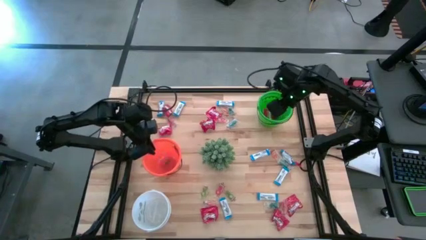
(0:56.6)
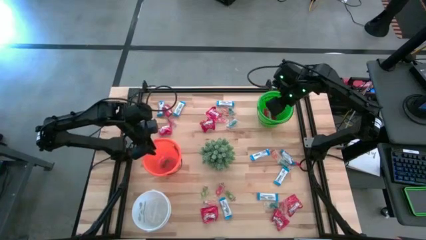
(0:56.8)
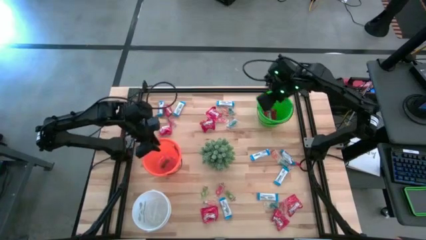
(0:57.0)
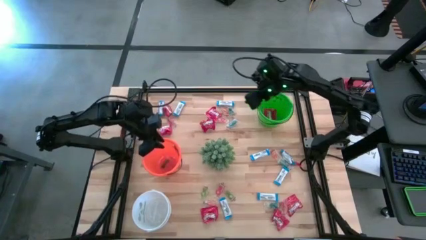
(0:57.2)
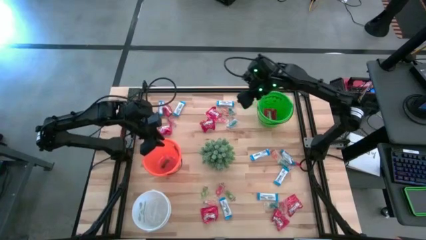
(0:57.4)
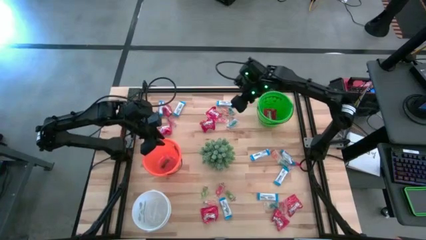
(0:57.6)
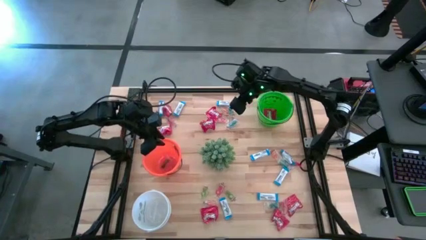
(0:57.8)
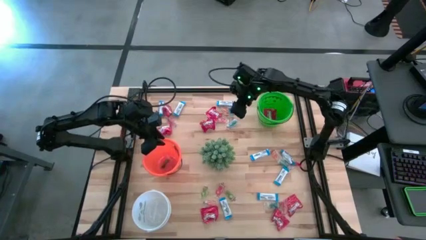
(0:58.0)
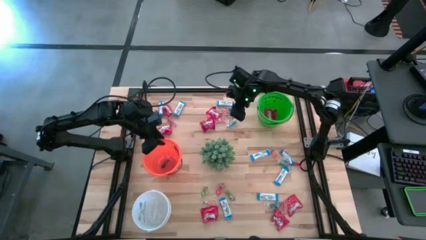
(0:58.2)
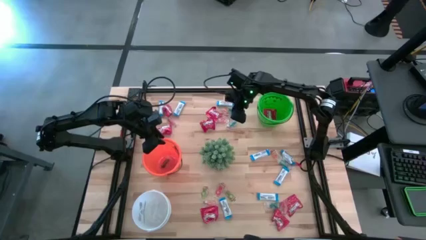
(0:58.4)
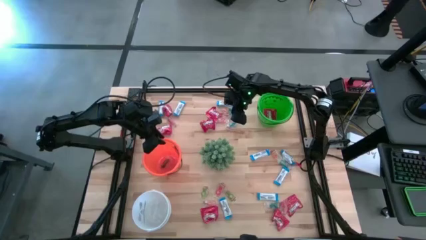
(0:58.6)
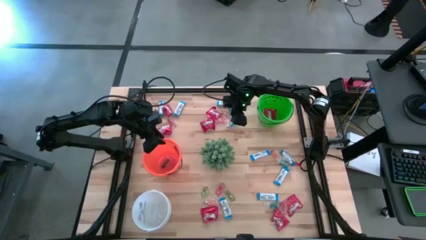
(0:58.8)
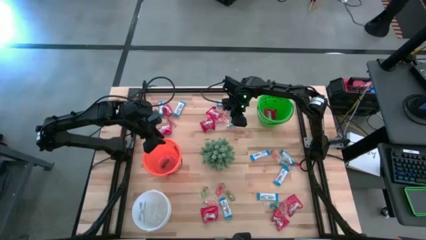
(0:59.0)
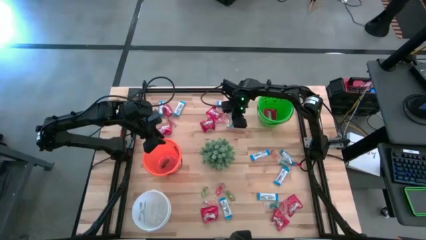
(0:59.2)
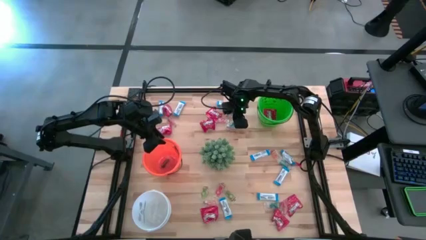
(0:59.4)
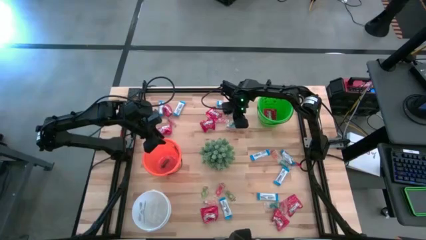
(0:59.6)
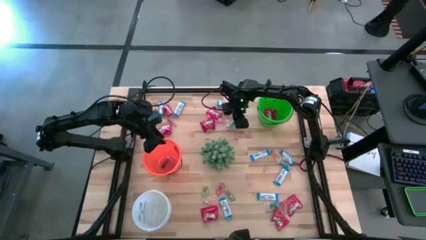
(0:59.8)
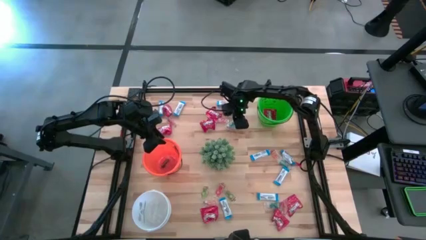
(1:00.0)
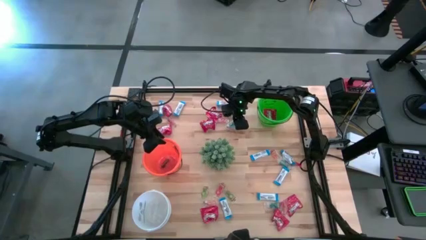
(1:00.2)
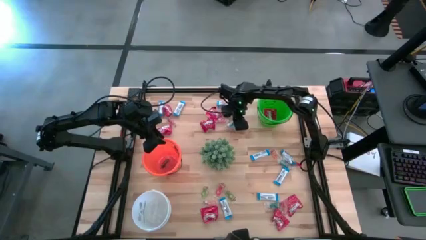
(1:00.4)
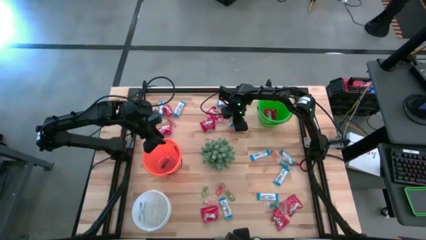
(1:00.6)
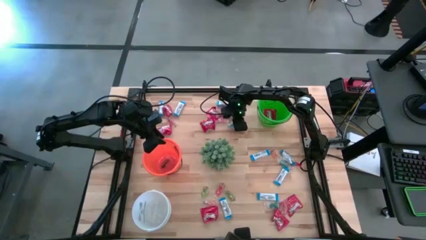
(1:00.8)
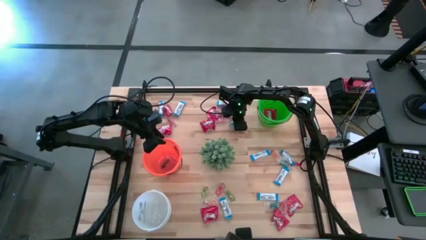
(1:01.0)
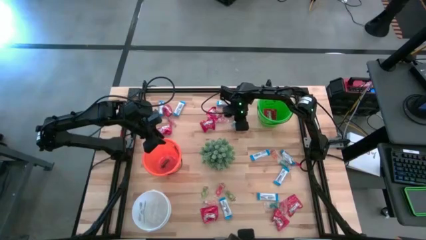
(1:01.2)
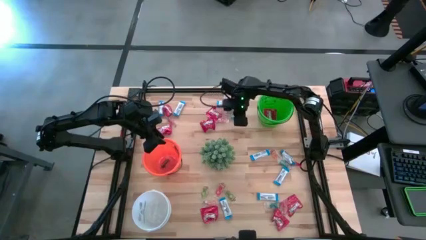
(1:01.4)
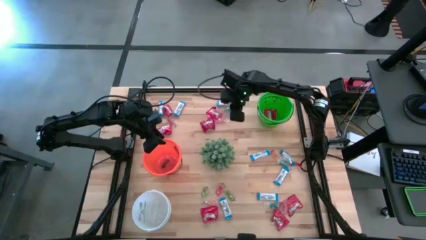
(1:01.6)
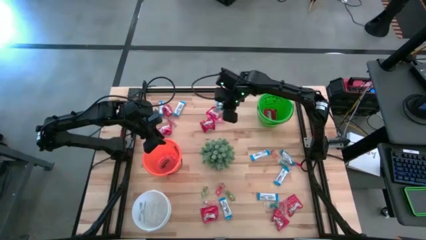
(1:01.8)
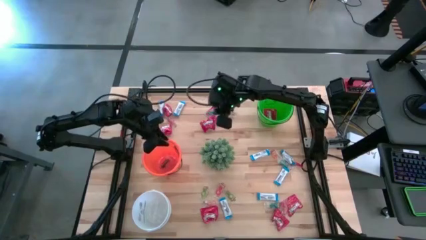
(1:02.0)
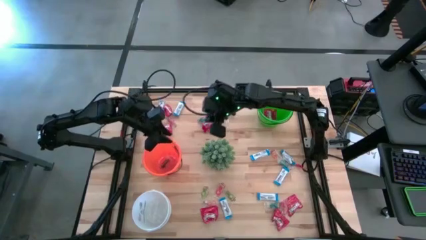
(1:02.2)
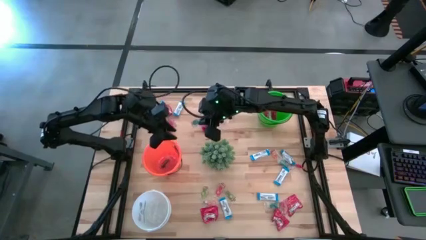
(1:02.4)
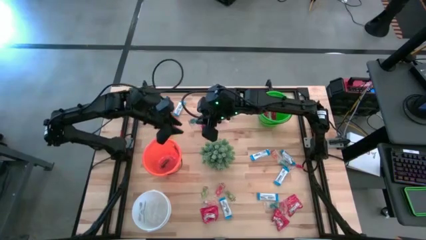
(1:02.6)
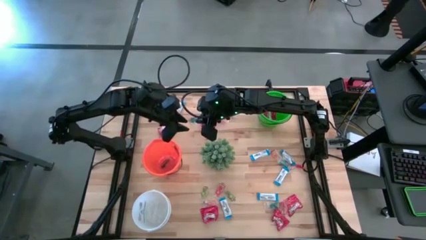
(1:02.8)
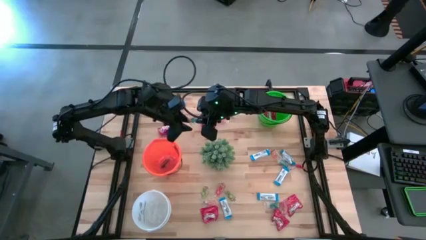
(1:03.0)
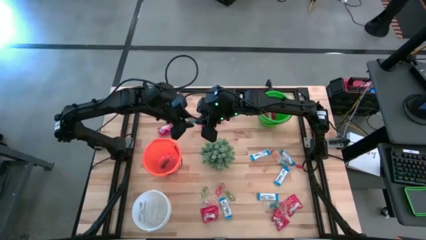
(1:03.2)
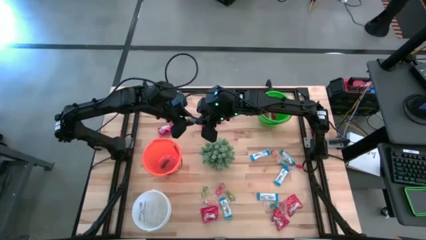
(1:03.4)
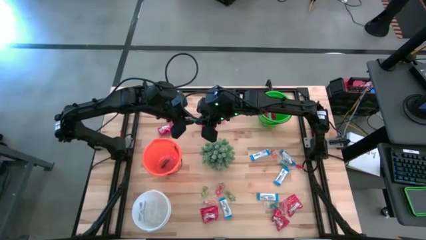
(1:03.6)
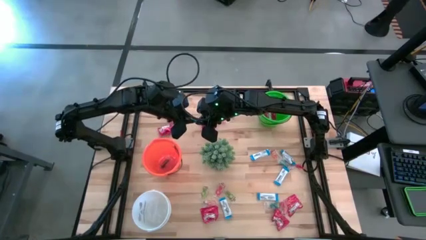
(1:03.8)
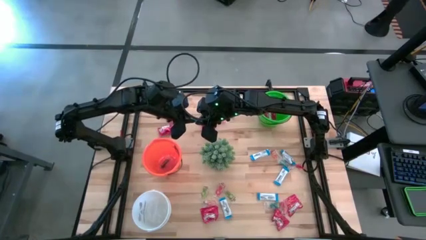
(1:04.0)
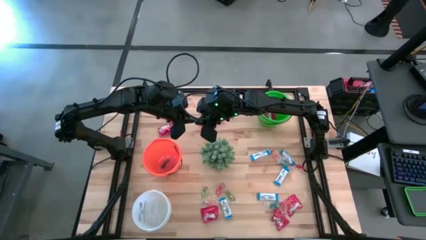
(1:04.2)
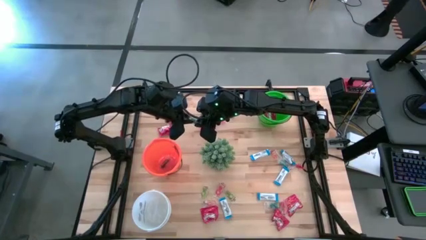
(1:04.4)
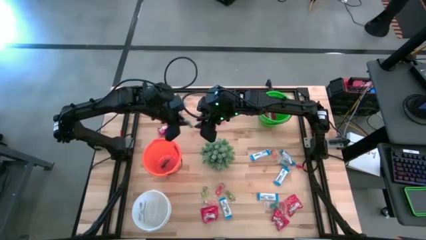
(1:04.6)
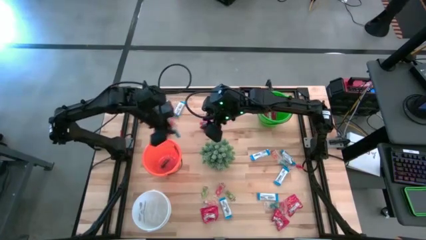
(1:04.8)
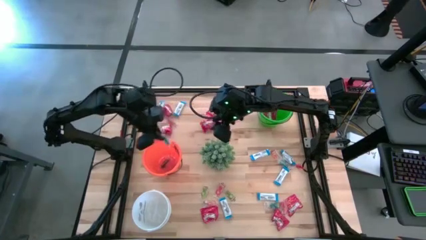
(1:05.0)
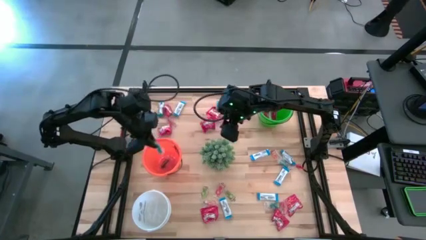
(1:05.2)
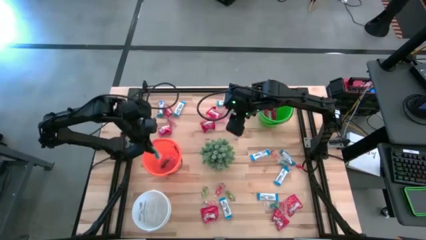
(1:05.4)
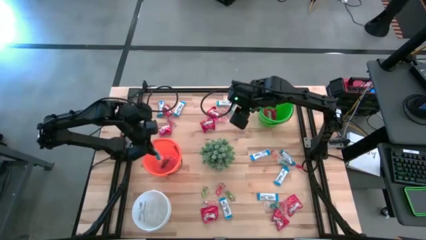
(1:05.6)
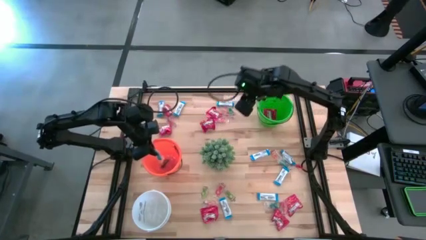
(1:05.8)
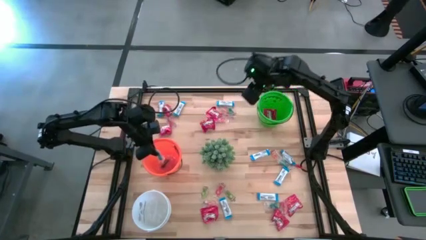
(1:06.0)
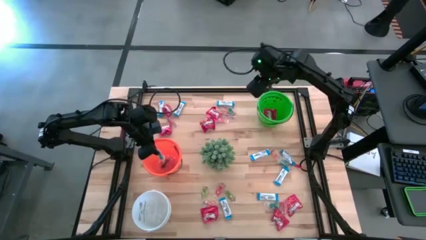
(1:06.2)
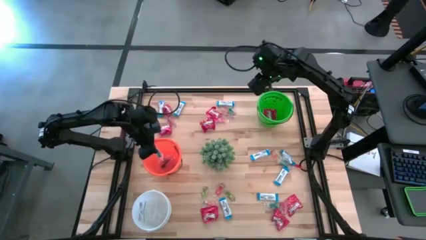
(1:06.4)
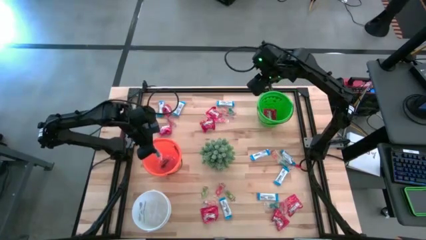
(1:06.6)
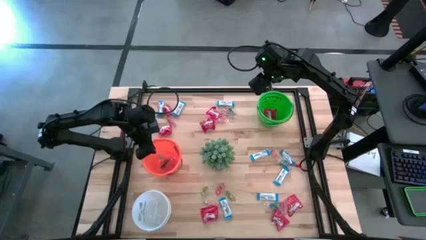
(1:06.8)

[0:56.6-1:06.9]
Task: Sort candy
Put the blue gummy into the orange bucket

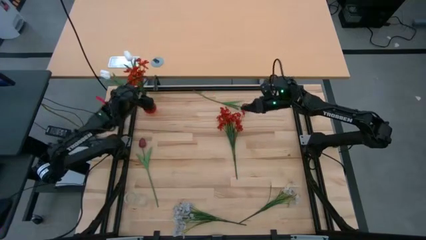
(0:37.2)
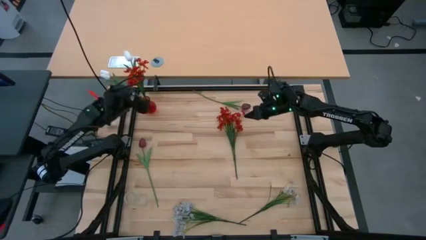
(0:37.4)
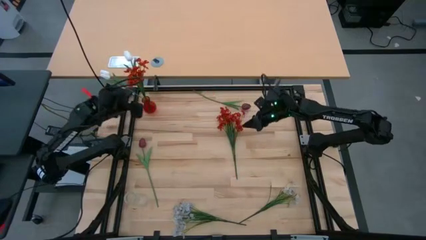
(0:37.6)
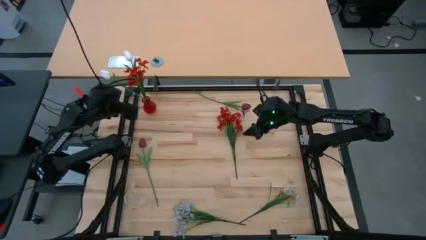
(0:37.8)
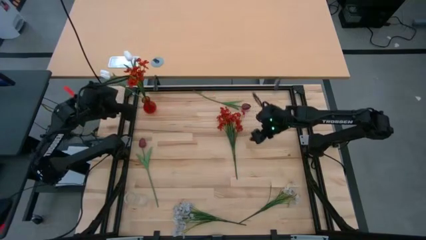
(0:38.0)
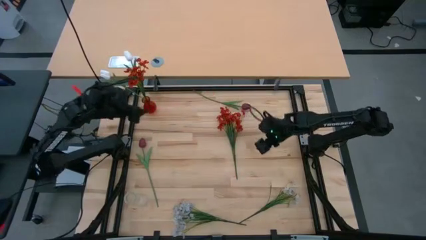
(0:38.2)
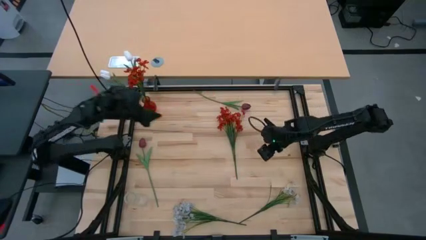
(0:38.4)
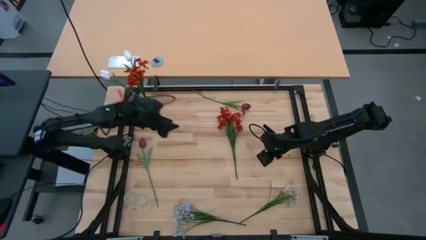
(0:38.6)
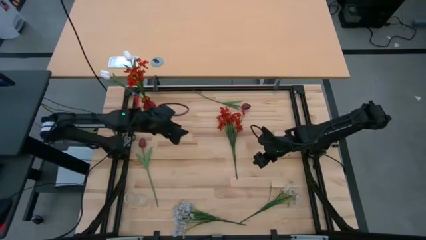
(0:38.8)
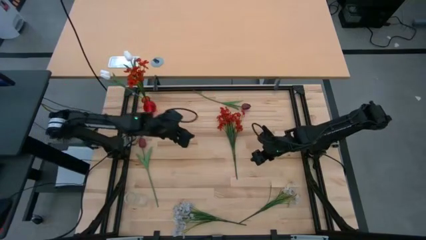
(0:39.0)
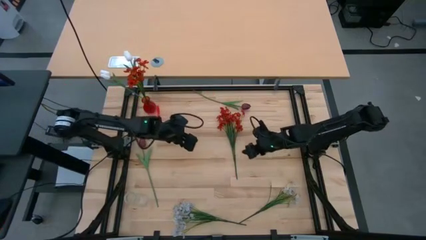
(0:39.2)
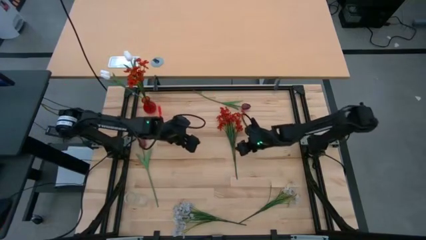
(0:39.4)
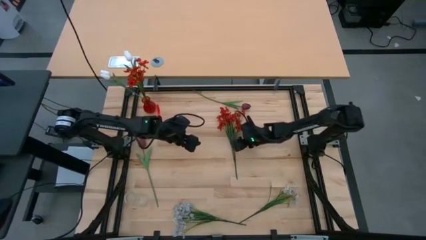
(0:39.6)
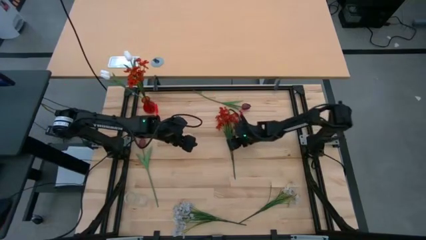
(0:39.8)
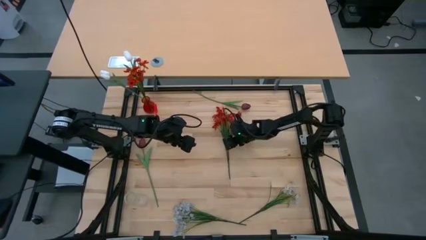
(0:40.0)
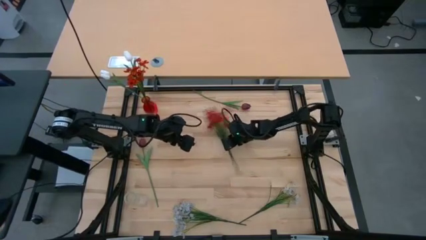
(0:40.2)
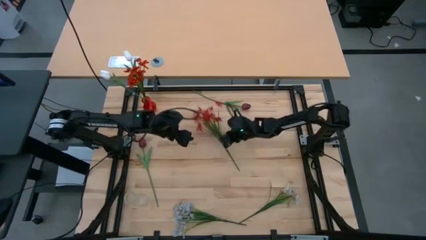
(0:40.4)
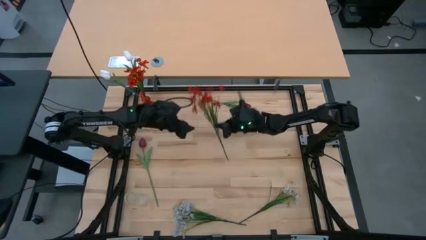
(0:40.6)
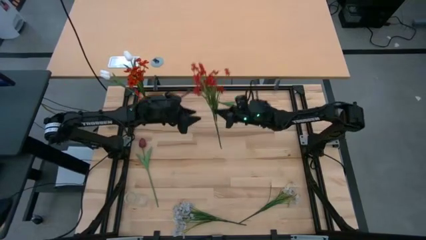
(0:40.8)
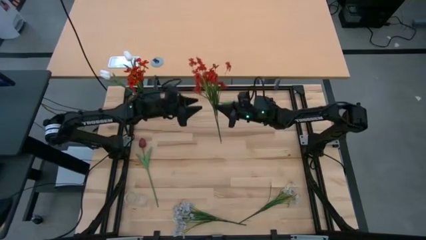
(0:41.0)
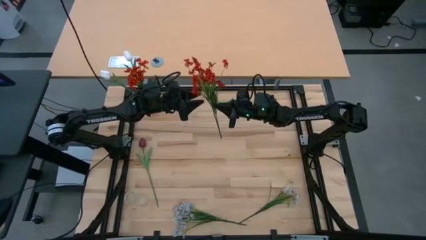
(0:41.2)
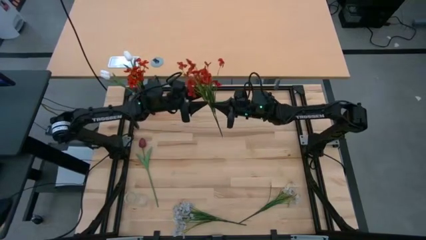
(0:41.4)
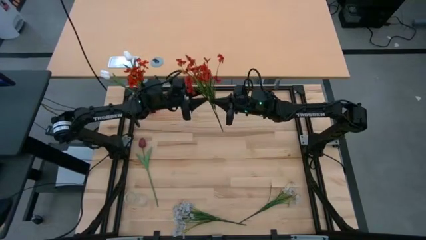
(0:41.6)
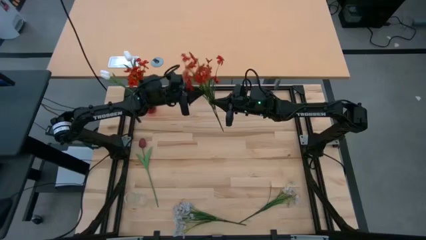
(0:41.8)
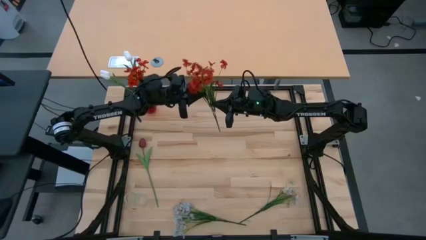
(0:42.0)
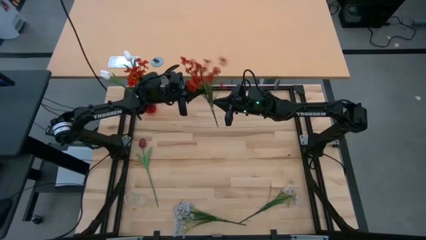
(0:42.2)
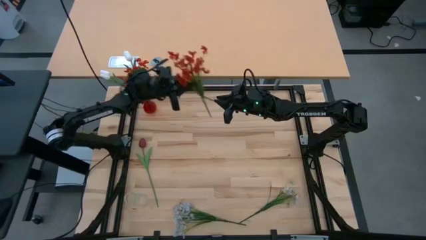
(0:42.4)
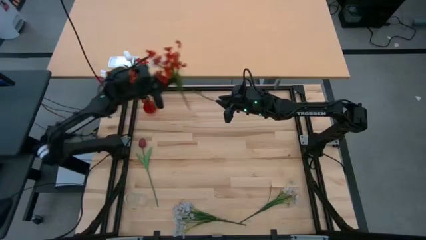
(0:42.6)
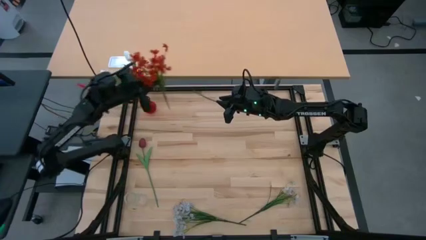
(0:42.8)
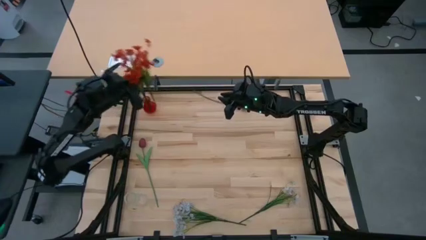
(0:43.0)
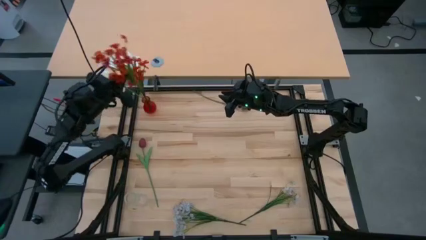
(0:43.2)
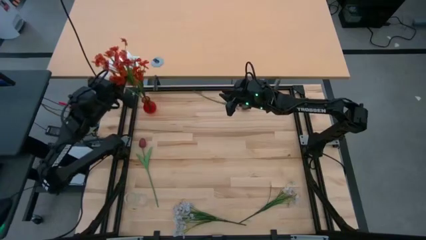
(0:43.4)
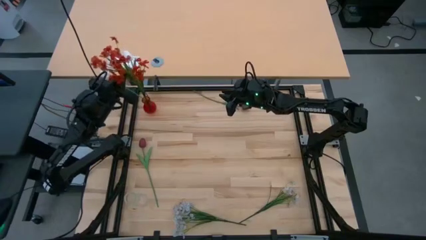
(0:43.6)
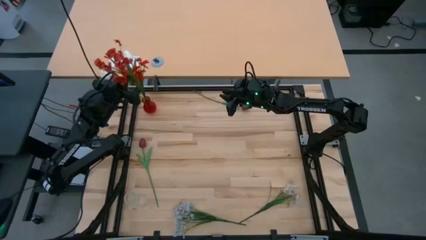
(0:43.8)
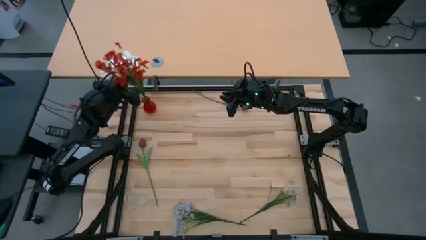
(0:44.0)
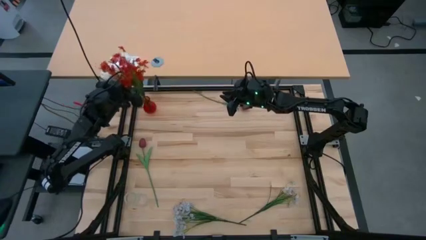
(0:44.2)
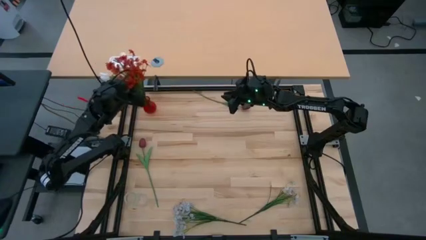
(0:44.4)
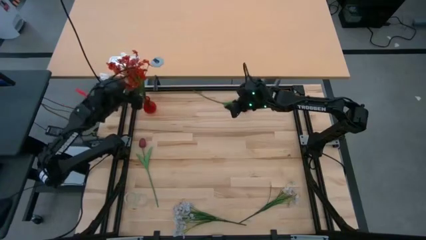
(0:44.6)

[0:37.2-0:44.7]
Task: Sort flowers into vase by color
Put the red flowers into the red vase
